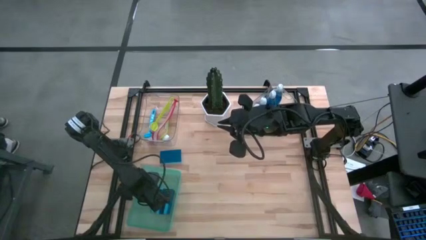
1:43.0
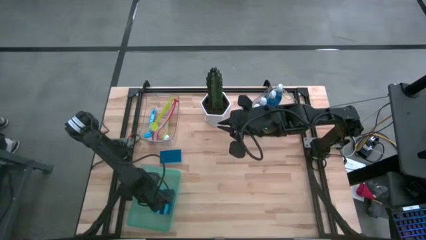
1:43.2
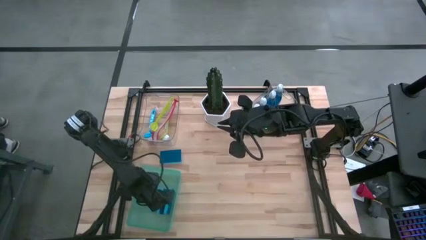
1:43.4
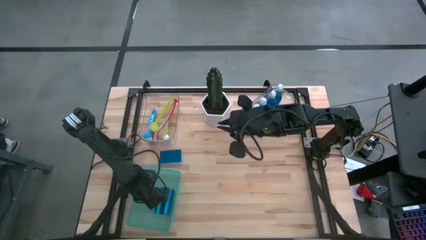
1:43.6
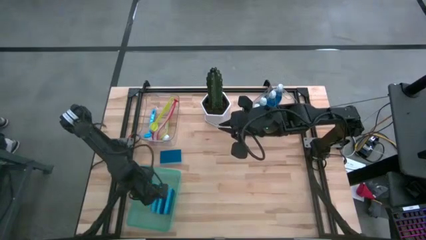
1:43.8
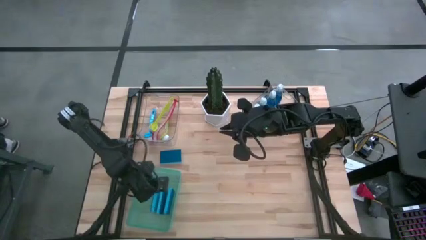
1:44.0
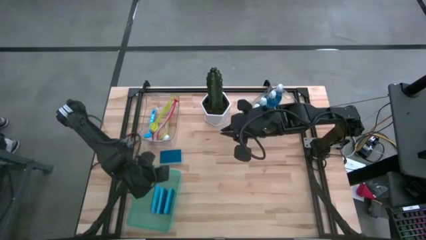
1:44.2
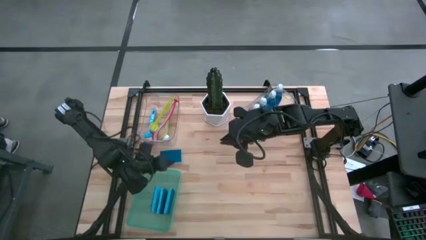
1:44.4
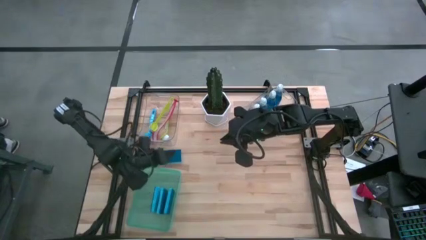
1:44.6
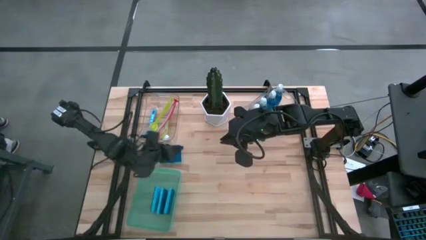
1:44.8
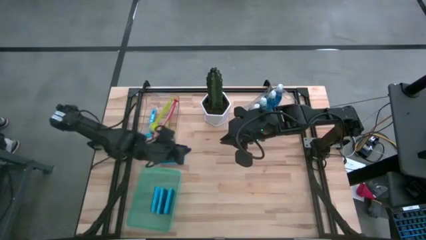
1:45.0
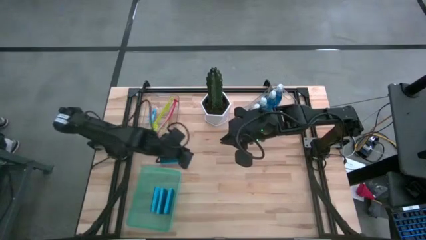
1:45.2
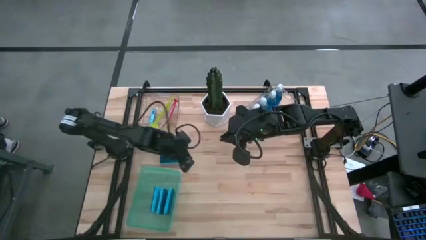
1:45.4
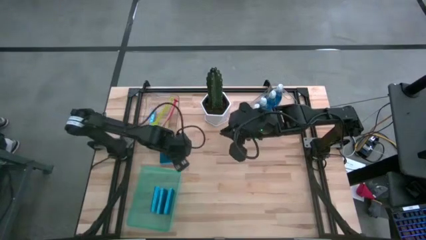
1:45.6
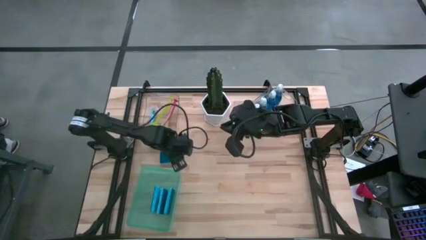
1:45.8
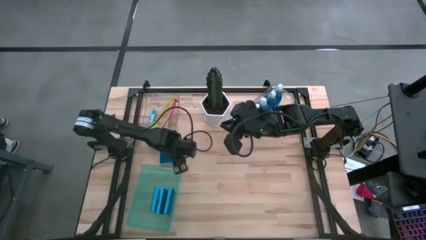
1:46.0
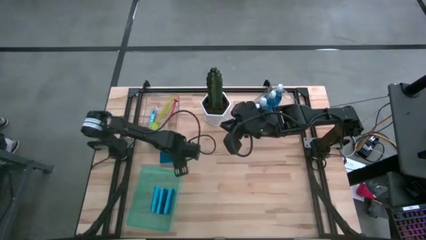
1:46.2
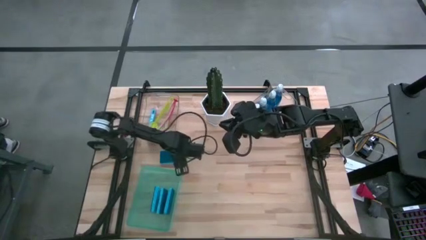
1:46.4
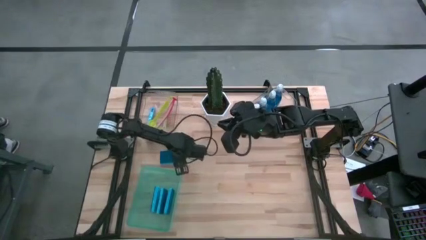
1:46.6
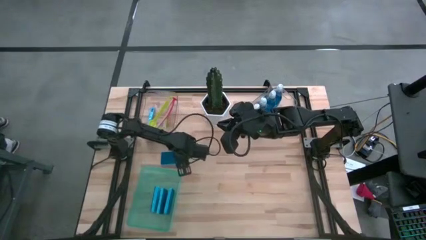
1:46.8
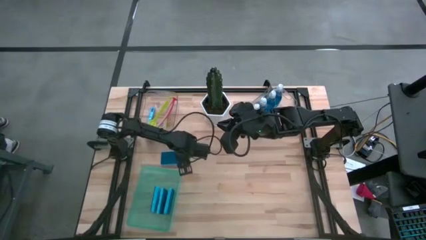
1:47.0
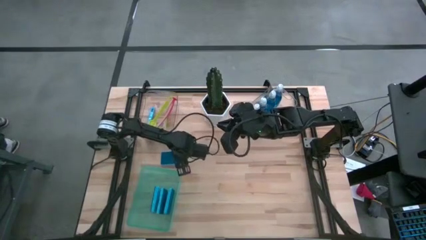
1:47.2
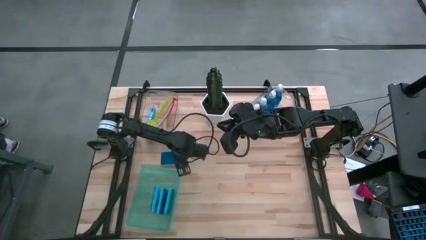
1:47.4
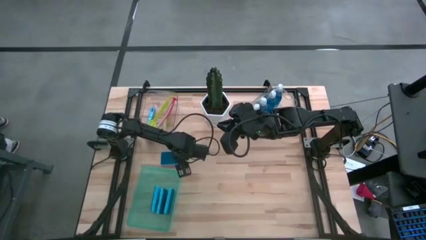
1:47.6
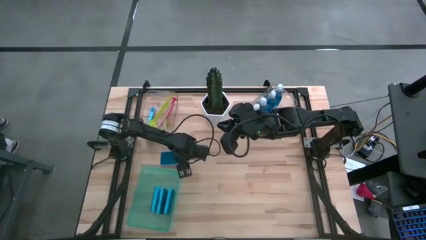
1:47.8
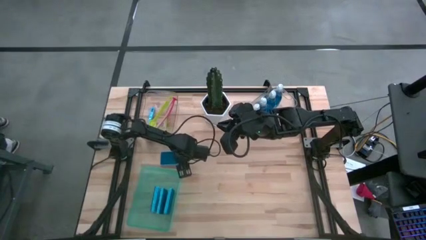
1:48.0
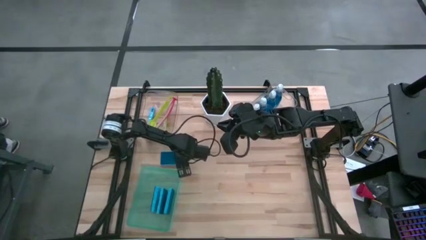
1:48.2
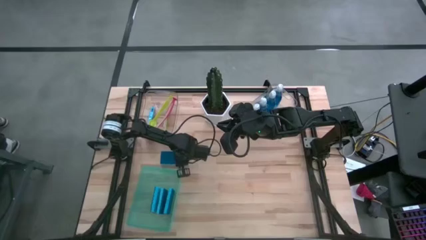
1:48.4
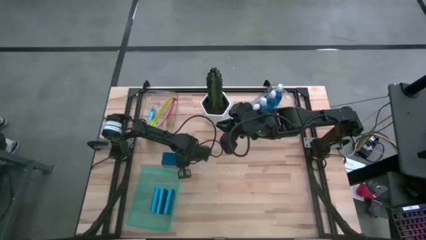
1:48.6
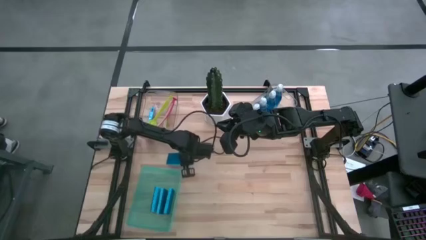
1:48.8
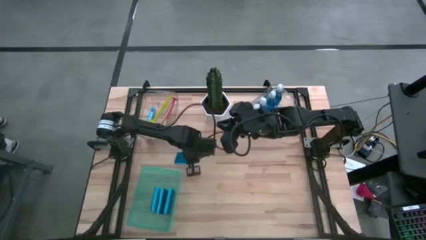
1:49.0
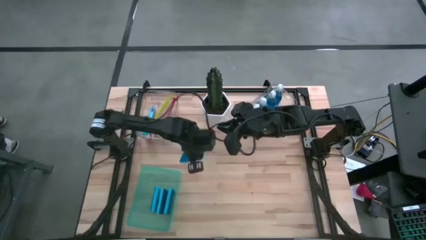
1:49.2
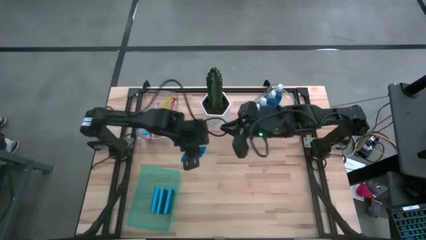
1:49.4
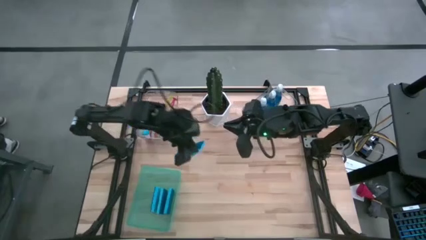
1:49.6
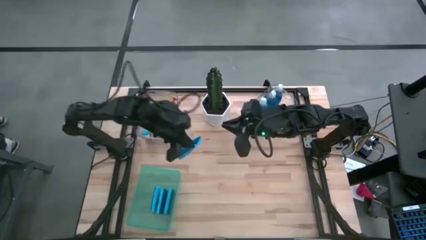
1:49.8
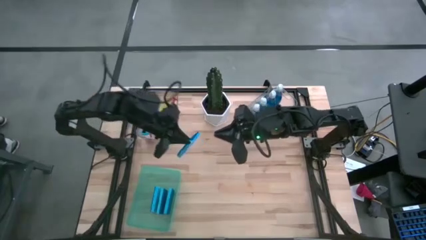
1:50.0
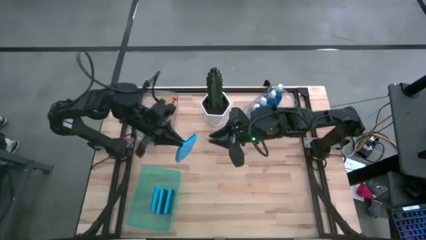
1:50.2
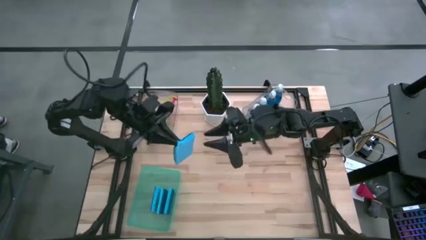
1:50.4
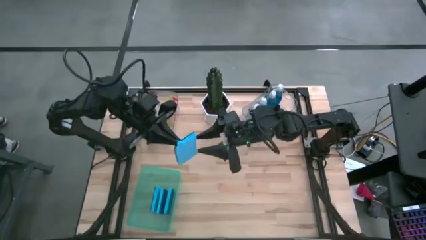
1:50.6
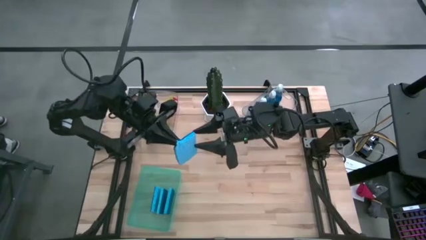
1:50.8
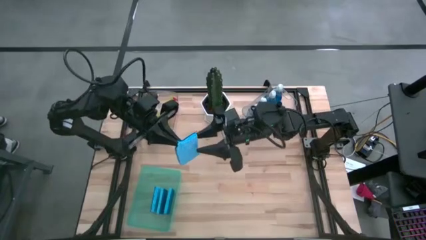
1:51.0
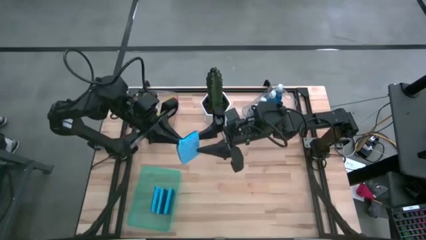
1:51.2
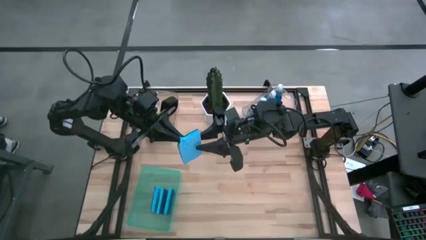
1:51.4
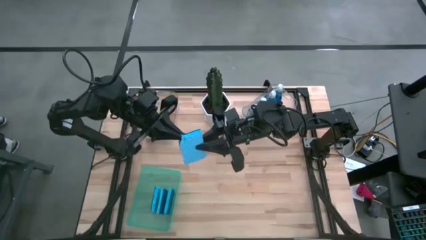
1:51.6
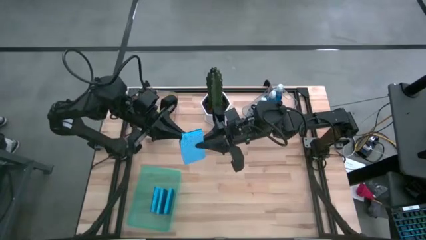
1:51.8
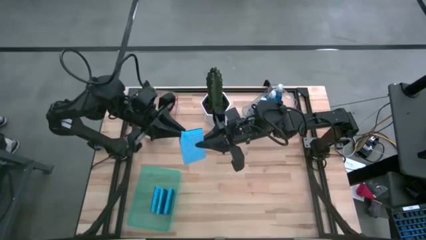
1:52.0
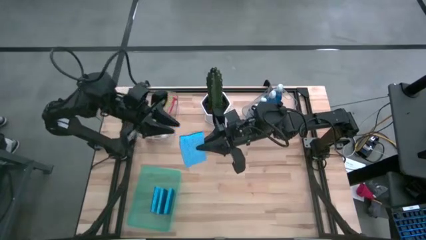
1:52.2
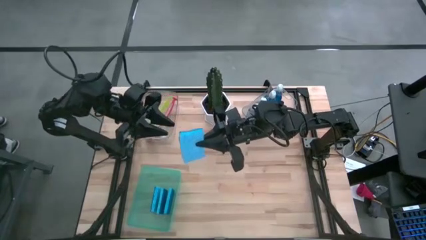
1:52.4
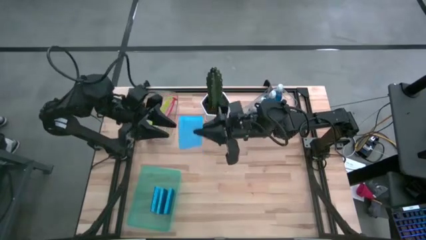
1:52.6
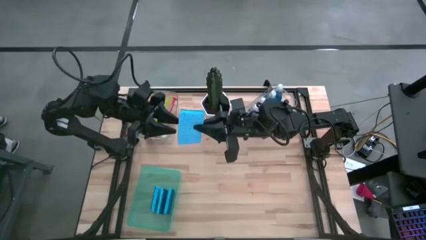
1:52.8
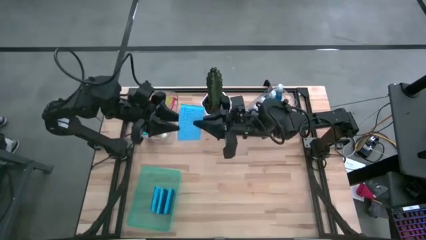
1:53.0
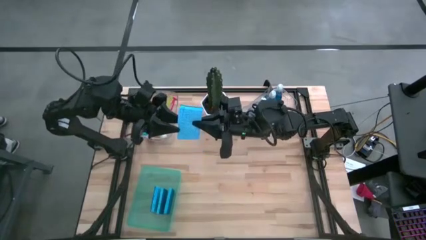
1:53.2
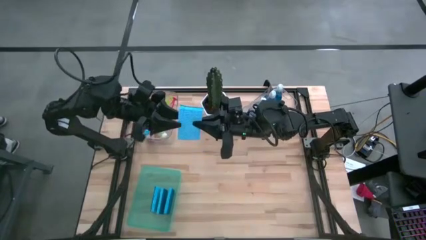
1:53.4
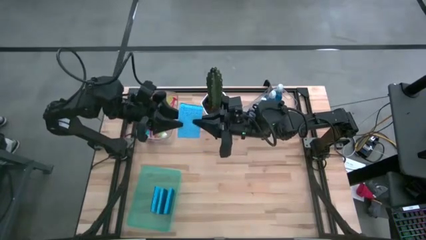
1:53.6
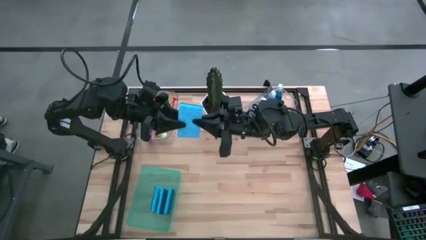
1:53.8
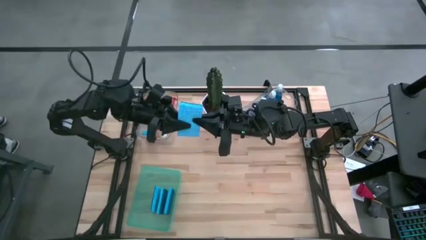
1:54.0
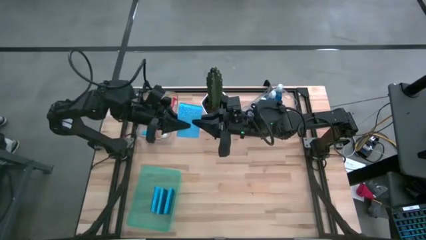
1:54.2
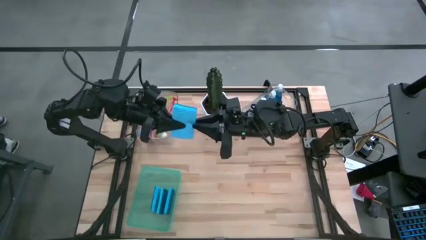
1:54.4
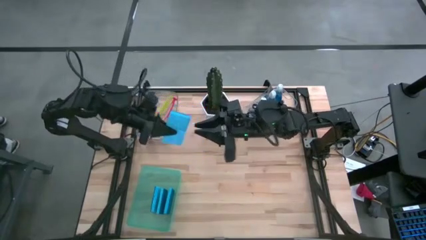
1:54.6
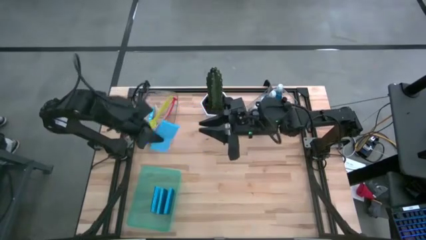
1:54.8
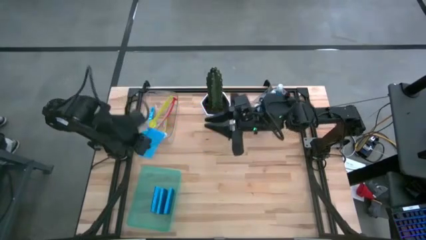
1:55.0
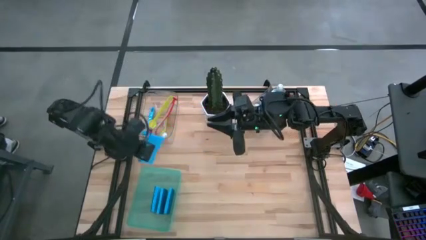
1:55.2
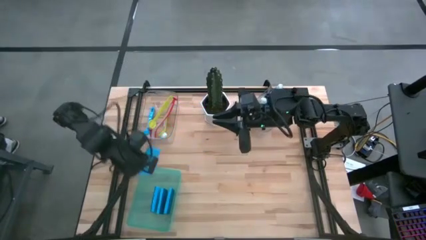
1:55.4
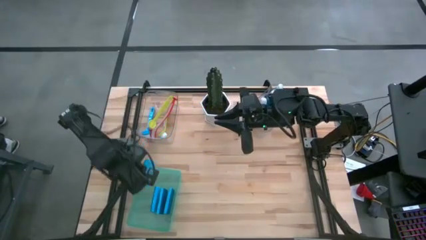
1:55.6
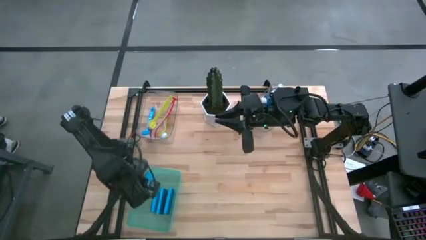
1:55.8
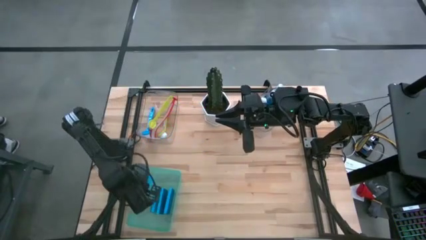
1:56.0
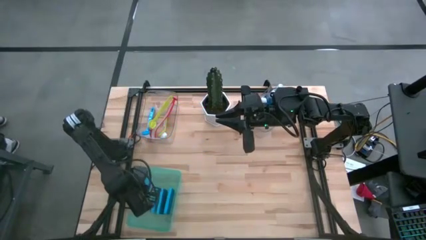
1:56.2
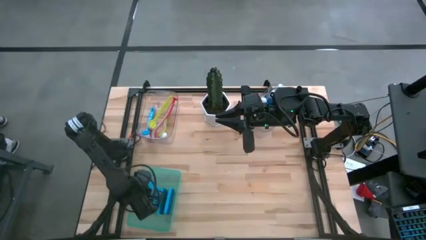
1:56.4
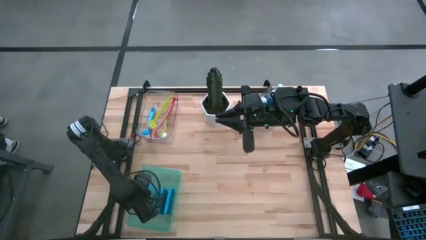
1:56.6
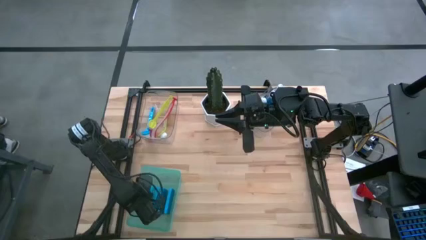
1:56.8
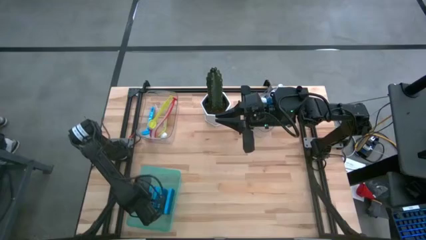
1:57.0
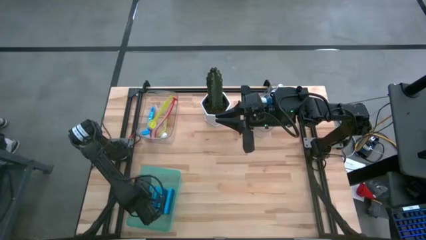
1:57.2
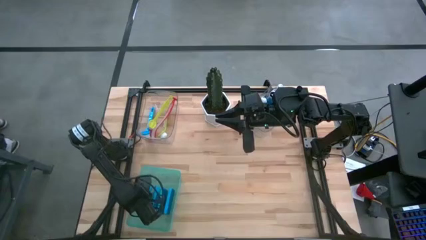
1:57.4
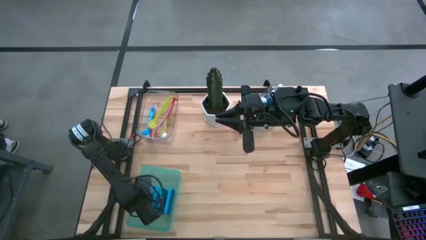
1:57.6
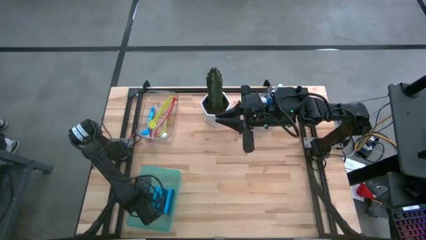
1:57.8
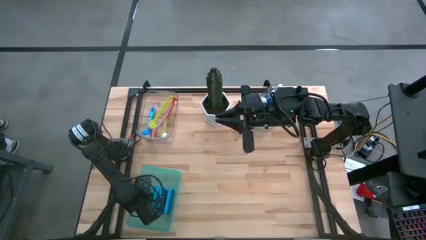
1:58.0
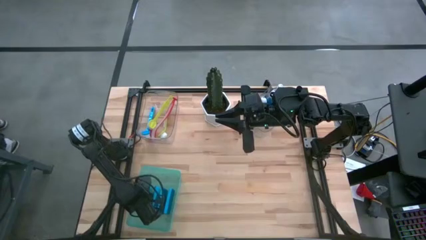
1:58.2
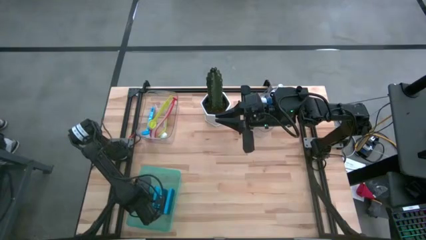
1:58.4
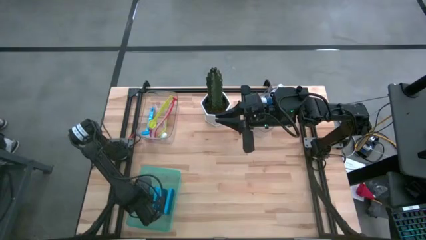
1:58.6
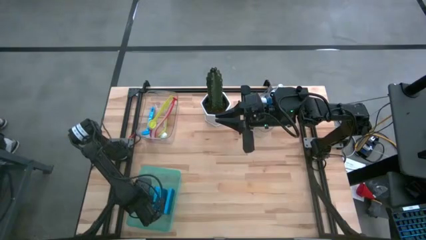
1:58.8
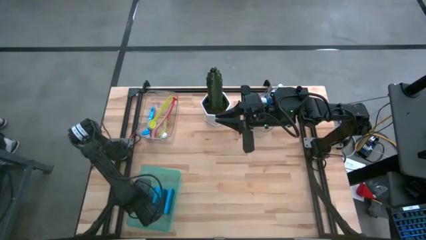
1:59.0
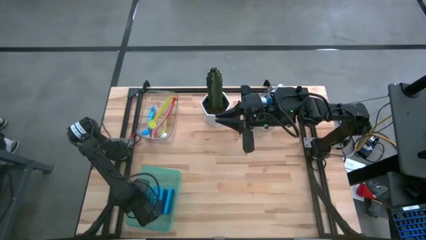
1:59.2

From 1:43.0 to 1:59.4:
Task: Pick & Place Kitchen Sink Supplies
Put the sponge into the green bin
